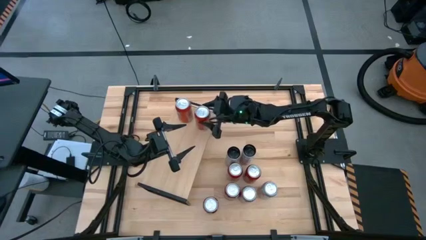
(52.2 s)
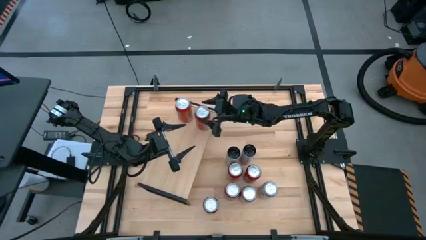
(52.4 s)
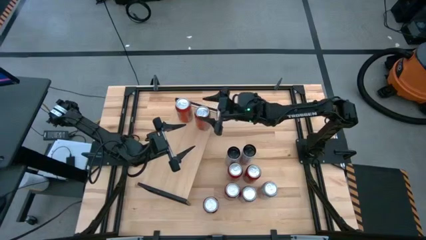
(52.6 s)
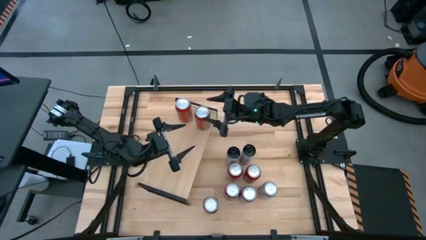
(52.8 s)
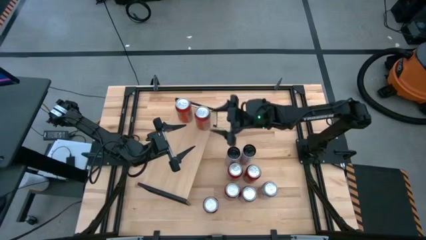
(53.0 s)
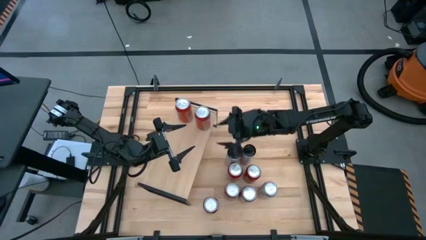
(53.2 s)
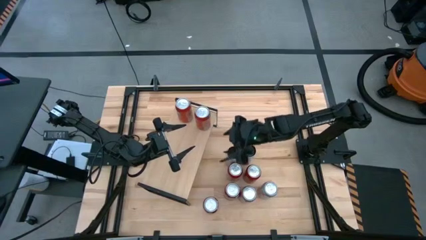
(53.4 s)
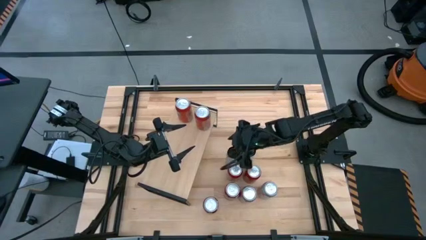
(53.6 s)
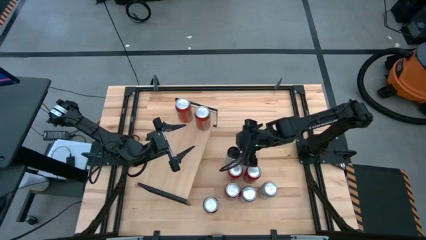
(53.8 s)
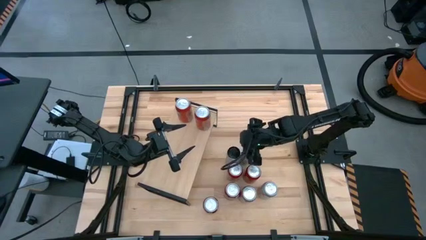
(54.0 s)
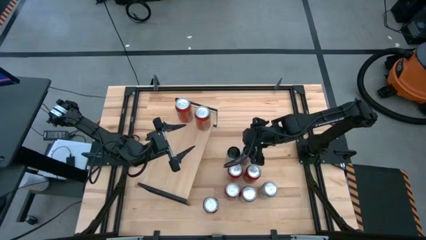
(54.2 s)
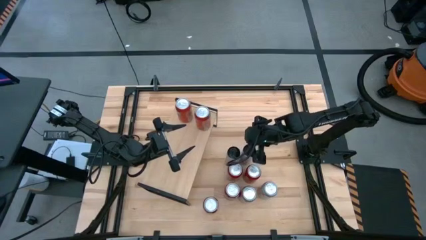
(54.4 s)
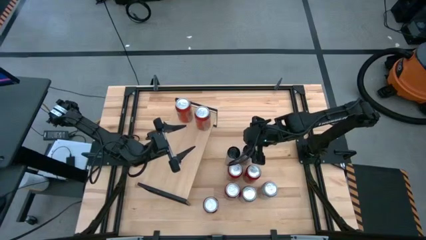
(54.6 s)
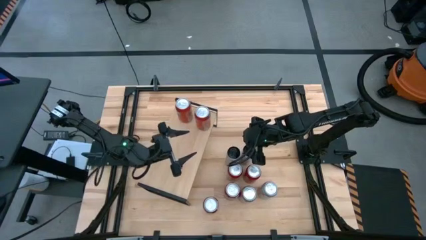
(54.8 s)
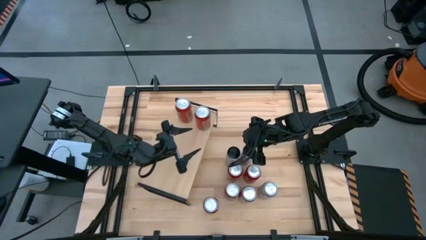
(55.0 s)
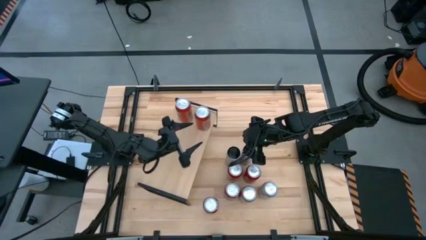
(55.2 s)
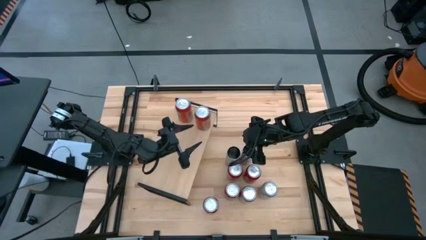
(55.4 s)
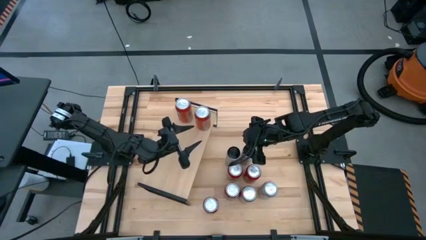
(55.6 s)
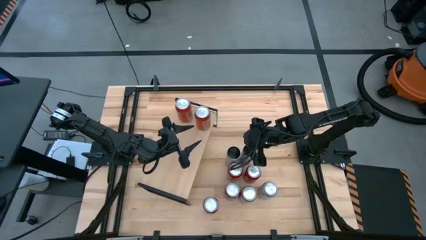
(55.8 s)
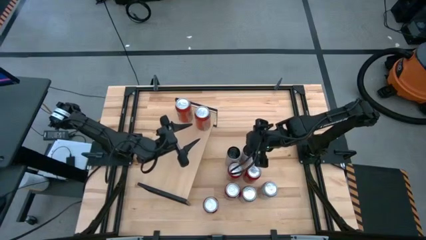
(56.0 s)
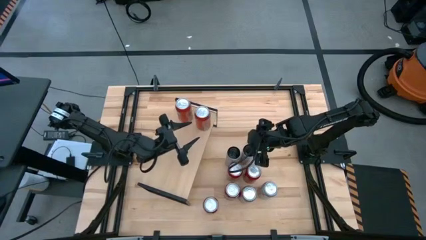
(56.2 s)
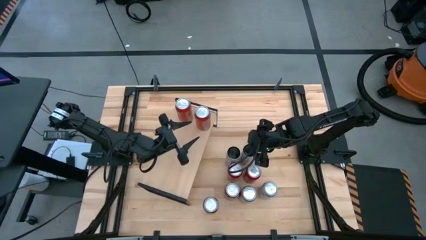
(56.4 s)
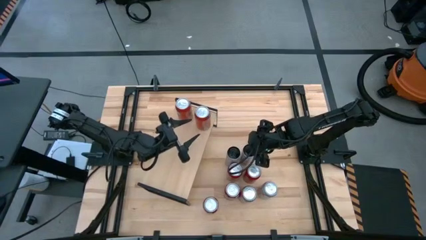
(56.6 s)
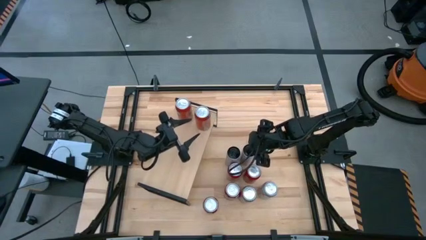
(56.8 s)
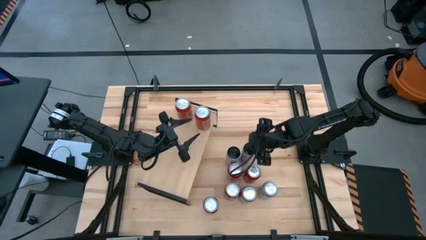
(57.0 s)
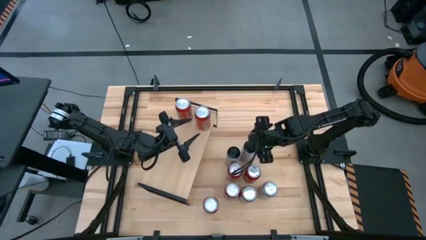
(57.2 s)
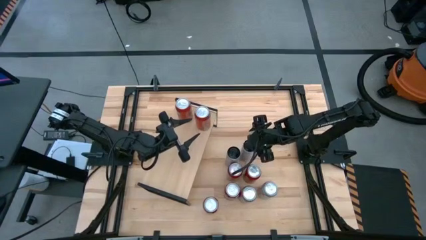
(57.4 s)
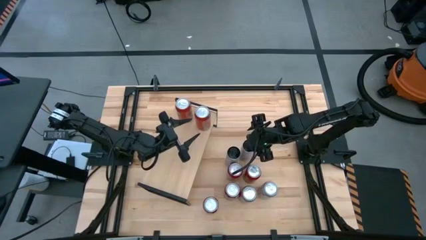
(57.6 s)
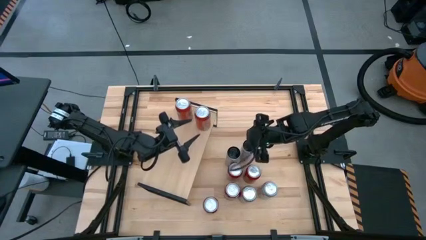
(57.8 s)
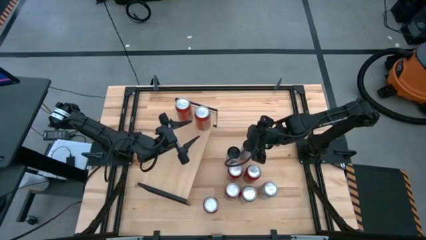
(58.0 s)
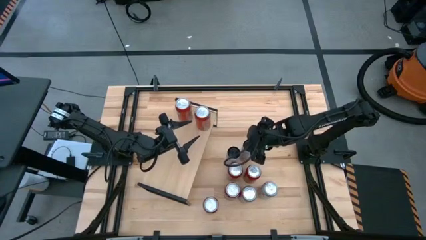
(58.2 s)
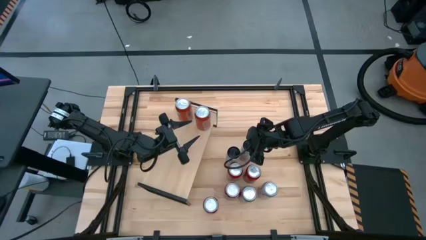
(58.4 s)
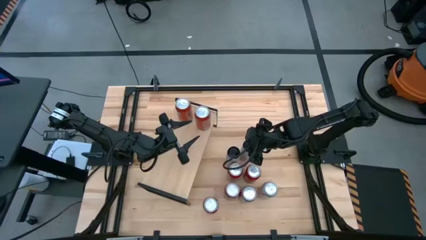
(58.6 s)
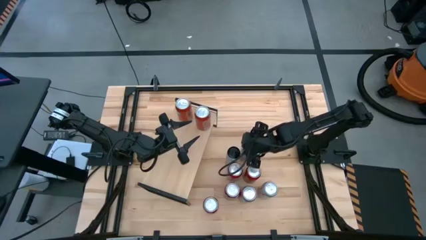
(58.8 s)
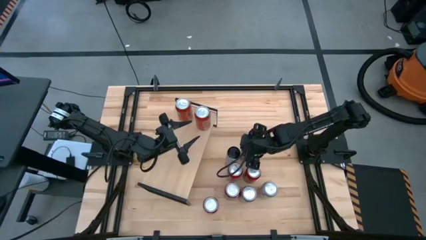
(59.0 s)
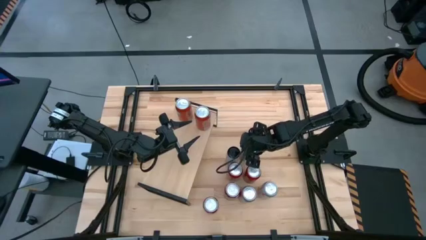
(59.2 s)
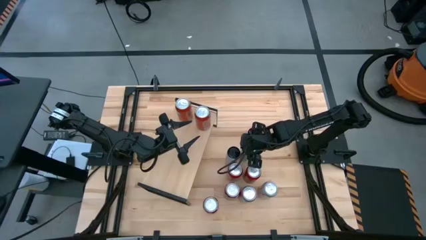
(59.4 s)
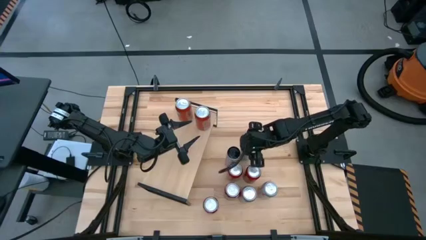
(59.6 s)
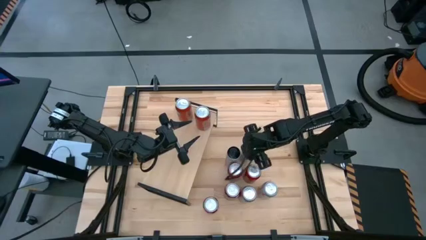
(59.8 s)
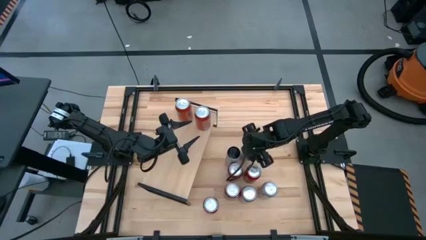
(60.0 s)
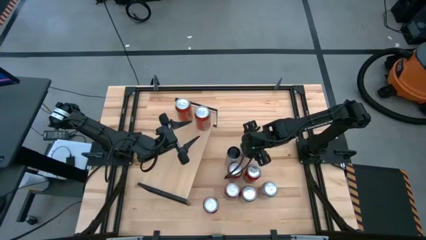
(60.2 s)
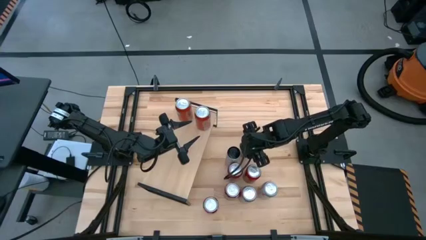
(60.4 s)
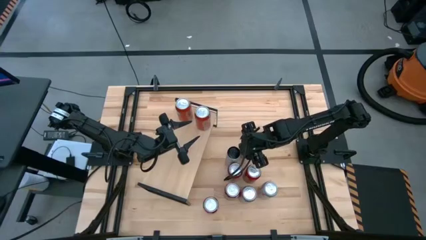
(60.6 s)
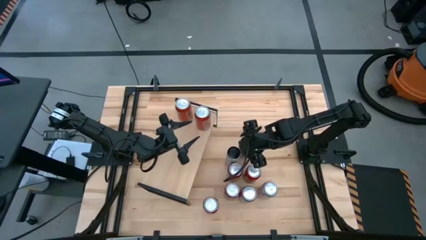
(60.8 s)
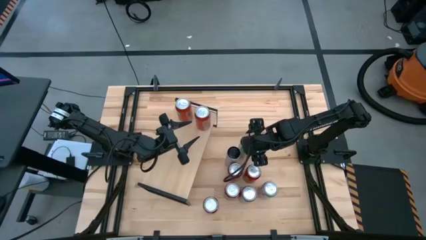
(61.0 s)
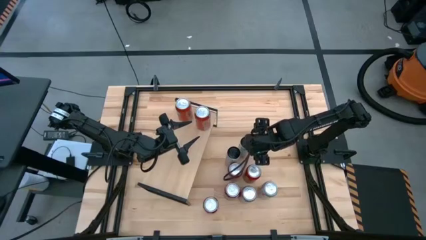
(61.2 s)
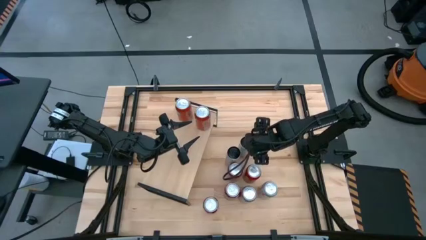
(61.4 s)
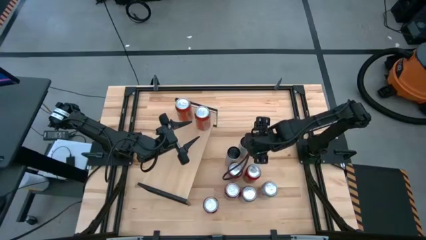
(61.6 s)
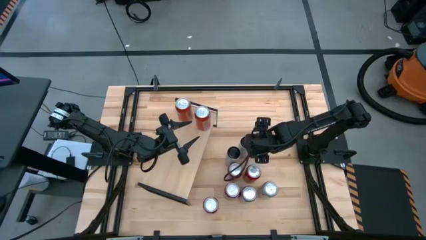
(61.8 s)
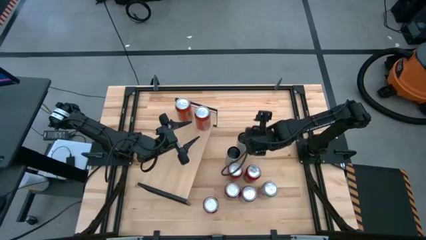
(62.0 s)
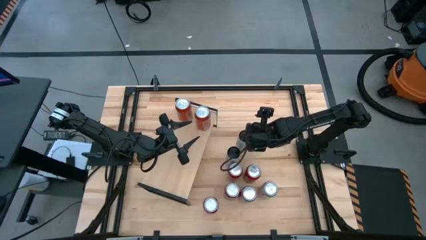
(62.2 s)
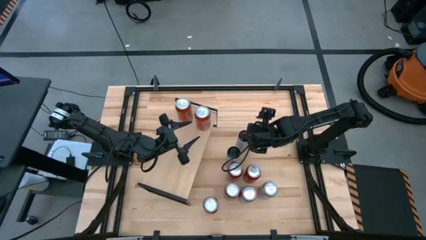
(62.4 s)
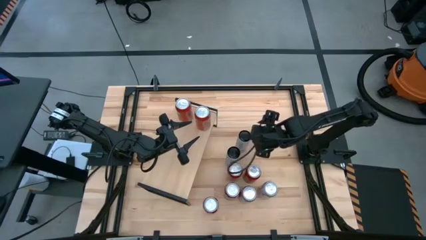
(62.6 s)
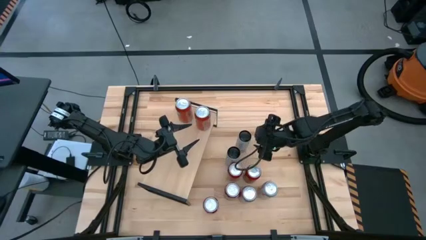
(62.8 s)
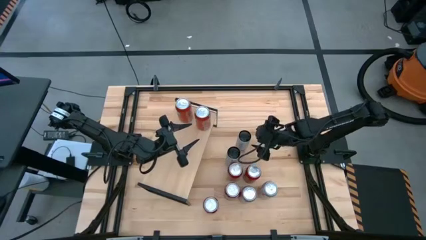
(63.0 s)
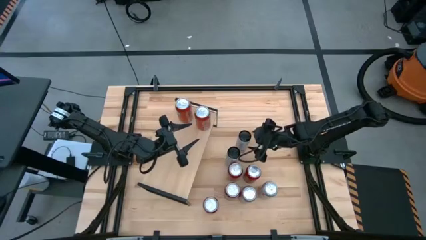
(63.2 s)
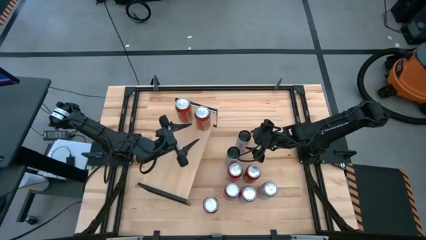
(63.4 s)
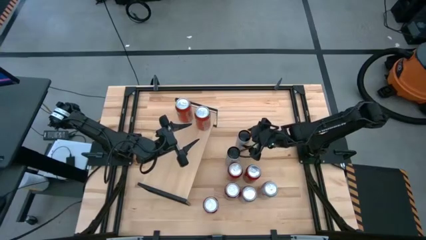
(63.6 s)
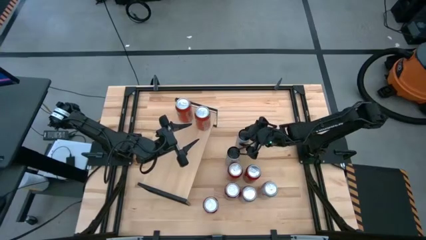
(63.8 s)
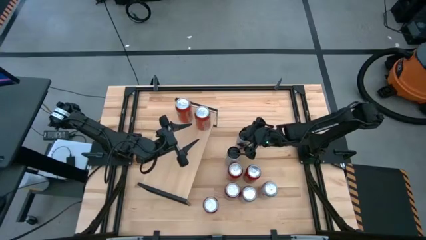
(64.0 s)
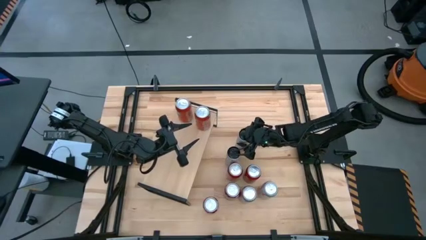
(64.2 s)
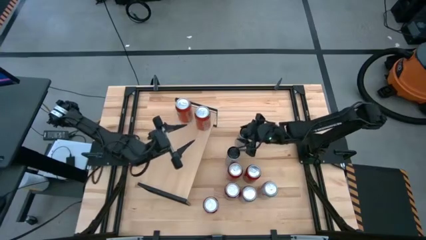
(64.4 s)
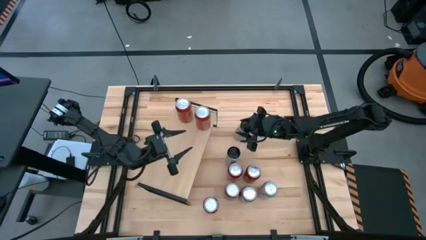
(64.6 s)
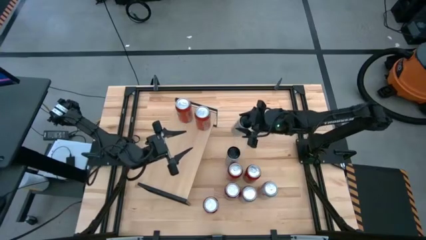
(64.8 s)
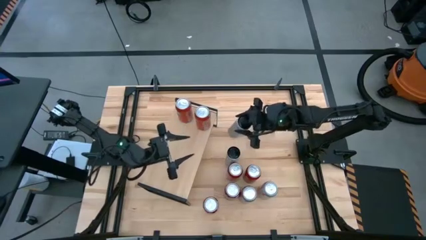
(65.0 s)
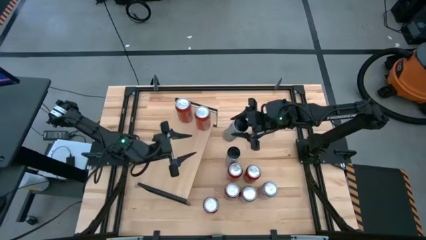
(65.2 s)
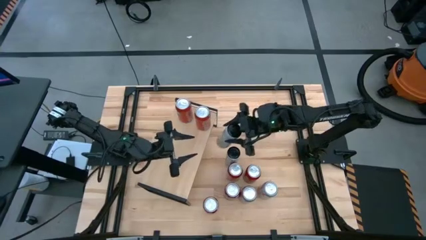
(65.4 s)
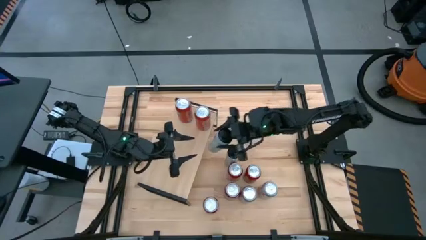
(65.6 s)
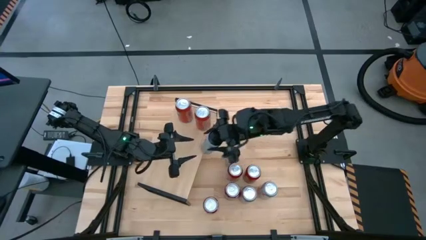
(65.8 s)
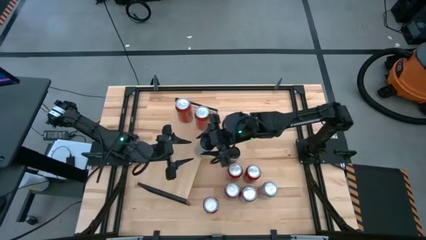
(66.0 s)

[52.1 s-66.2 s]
Task: Place canned beverage on shelf
Put the top white soda can on the shelf

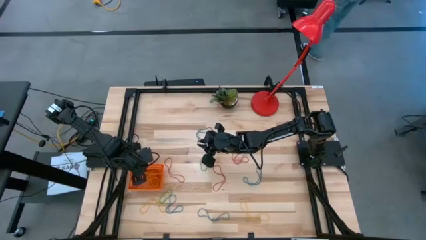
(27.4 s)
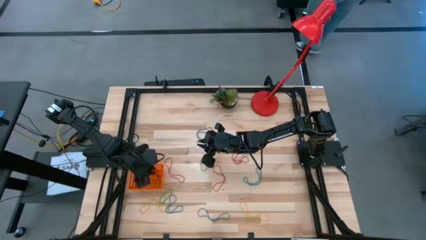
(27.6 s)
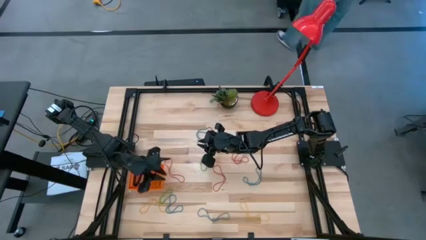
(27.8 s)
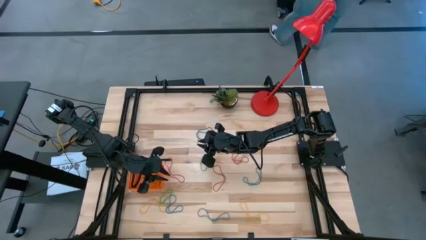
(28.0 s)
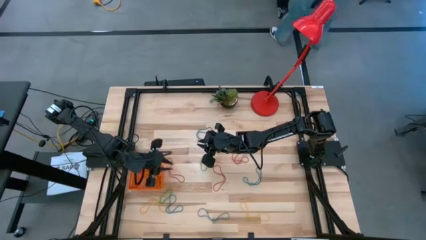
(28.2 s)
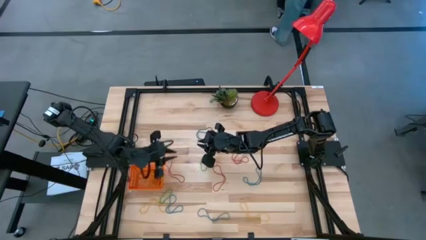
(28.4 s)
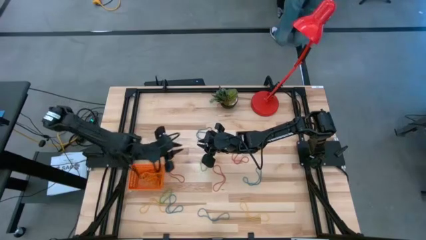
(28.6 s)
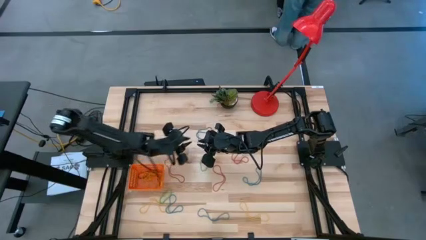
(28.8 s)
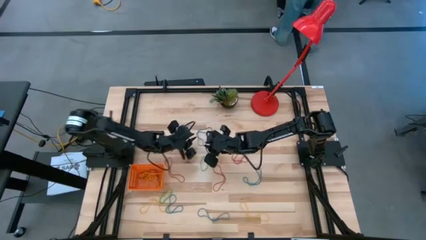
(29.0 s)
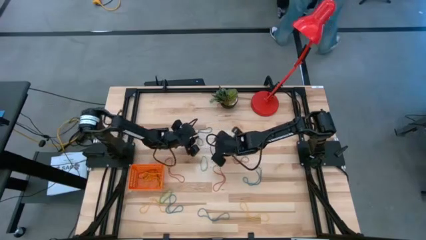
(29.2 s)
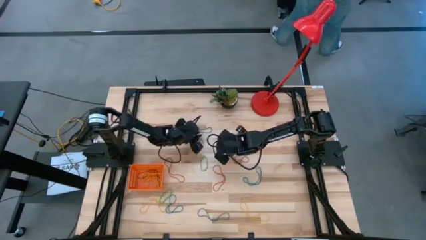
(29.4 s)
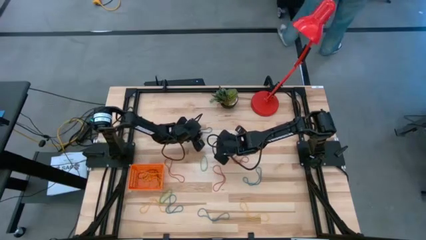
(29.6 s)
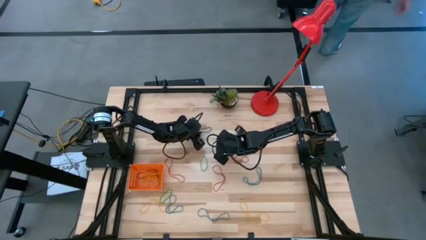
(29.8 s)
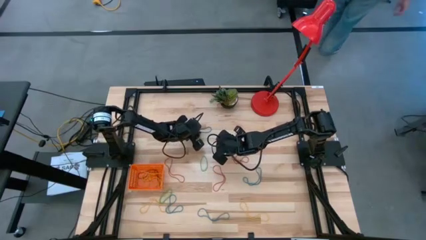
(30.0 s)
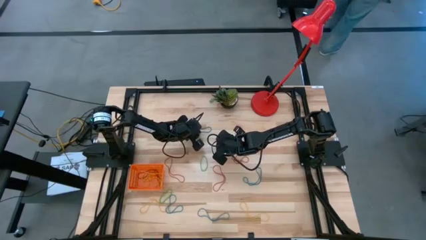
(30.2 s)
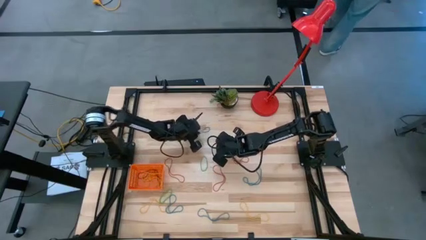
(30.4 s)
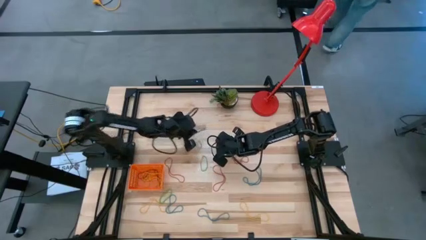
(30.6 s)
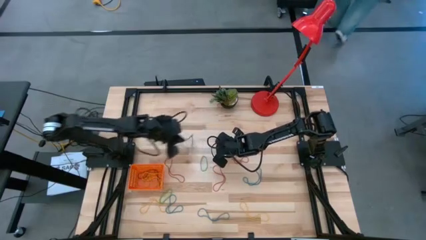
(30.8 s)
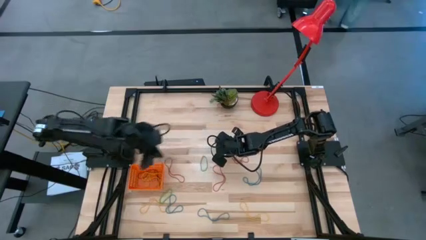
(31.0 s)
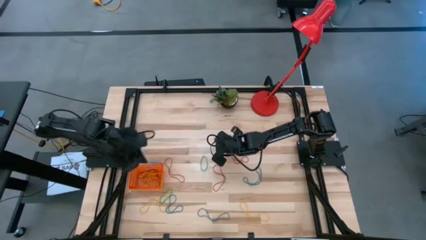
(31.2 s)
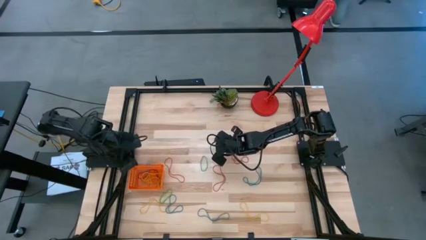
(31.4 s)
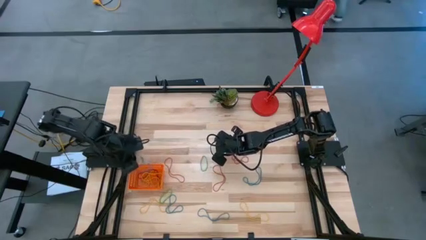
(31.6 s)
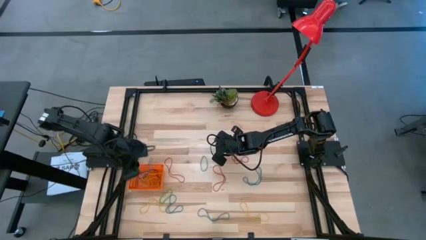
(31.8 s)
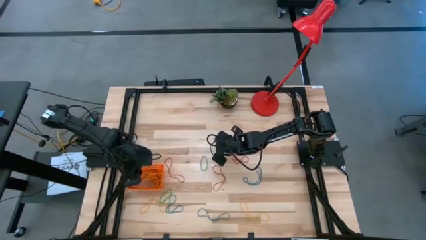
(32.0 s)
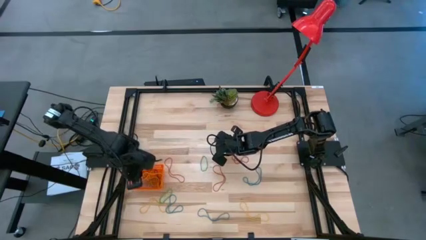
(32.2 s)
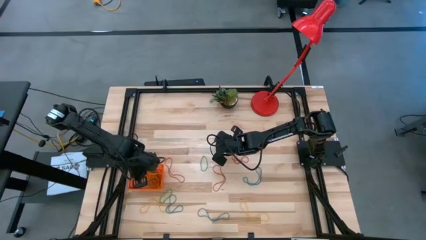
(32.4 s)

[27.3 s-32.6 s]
Task: Pick and place rubber bands into bin
Put the blue rubber band into the orange basket
